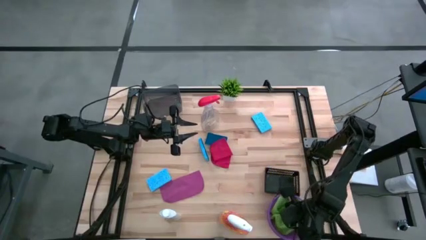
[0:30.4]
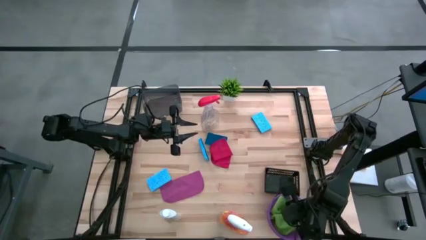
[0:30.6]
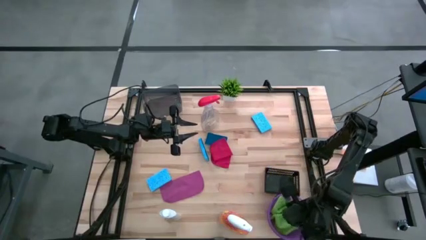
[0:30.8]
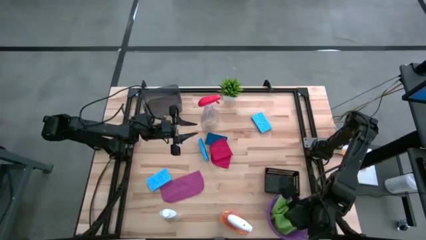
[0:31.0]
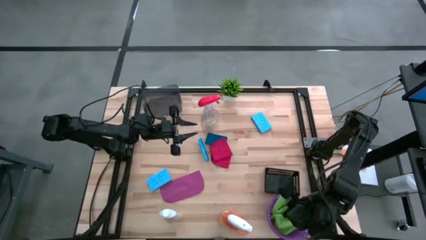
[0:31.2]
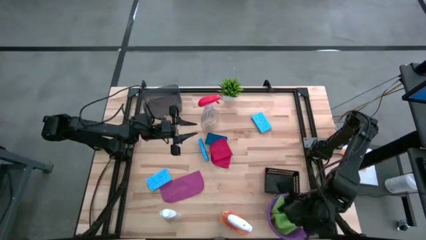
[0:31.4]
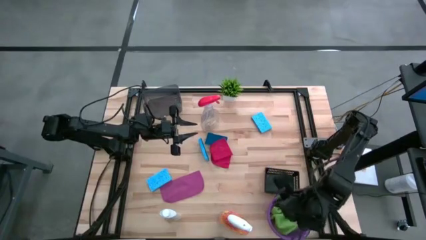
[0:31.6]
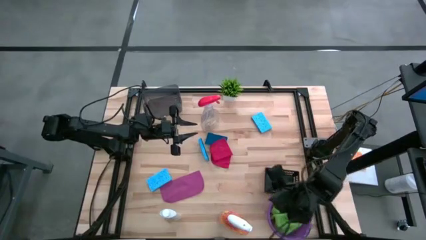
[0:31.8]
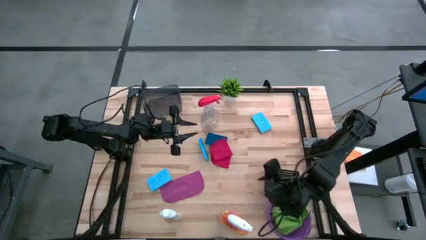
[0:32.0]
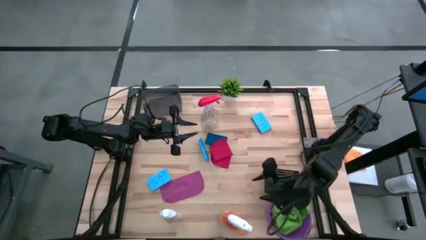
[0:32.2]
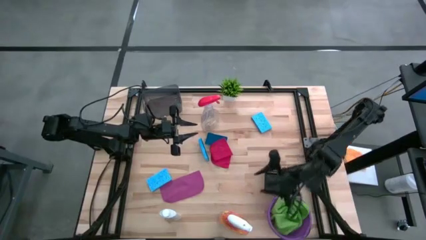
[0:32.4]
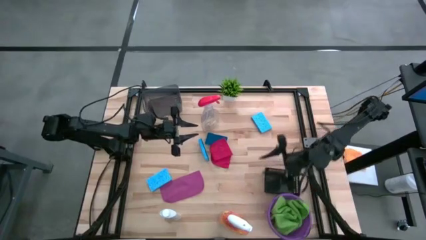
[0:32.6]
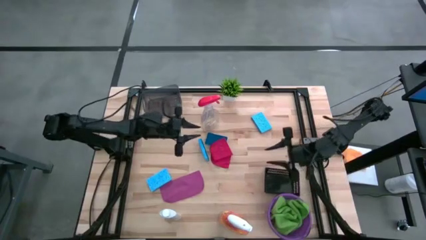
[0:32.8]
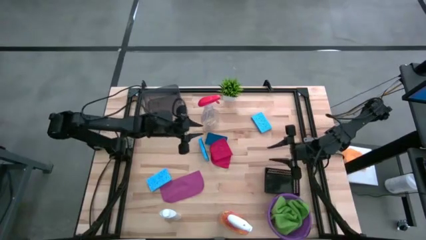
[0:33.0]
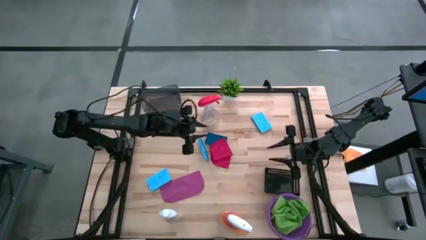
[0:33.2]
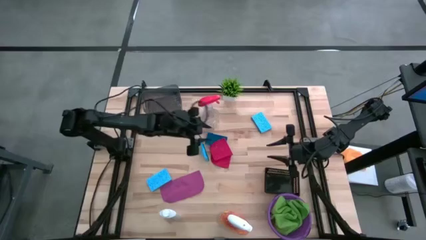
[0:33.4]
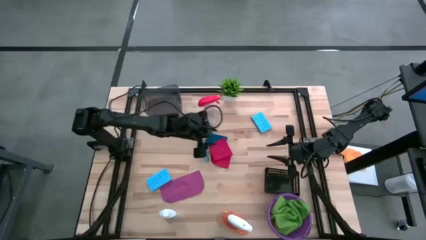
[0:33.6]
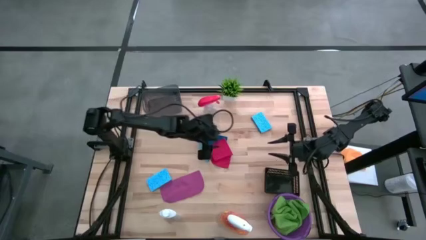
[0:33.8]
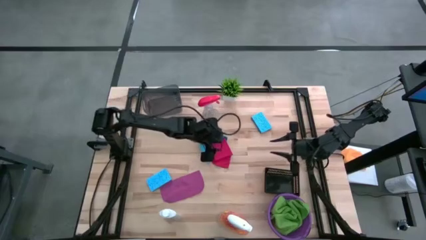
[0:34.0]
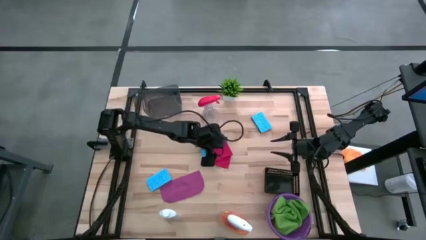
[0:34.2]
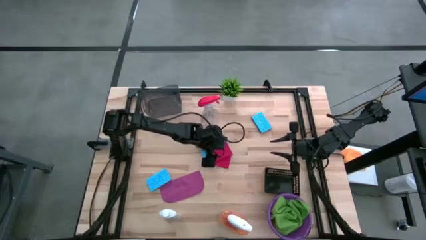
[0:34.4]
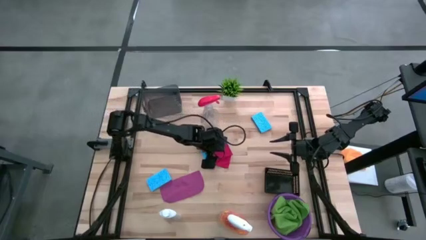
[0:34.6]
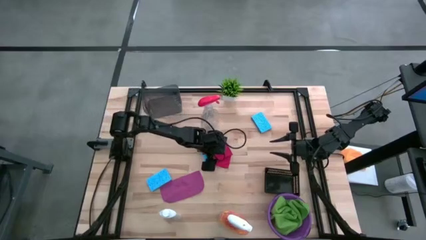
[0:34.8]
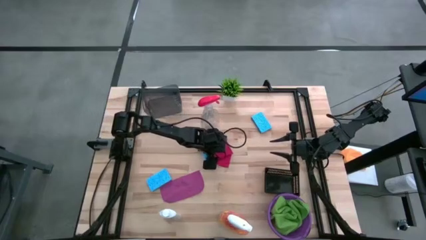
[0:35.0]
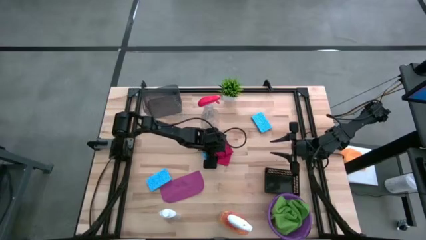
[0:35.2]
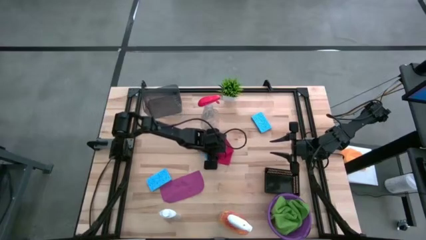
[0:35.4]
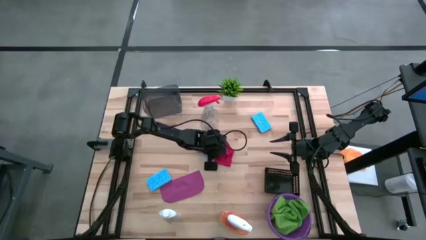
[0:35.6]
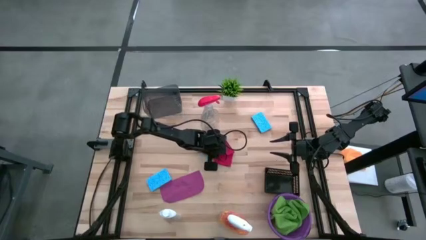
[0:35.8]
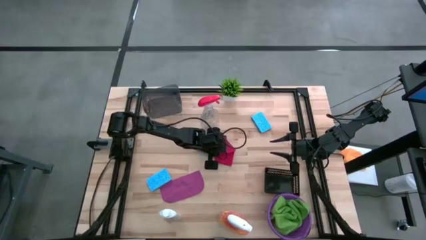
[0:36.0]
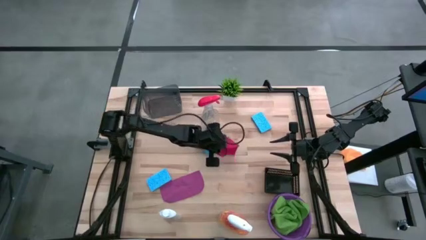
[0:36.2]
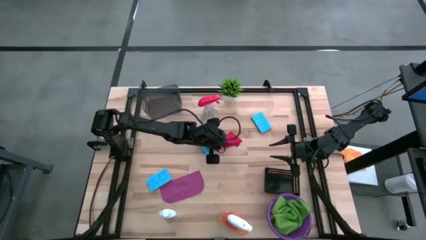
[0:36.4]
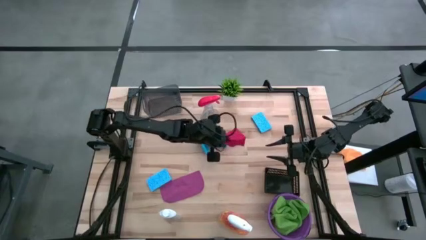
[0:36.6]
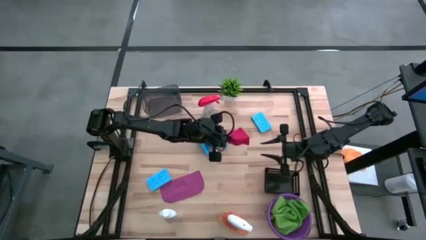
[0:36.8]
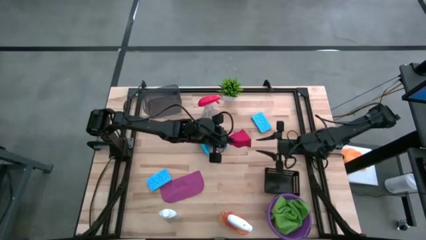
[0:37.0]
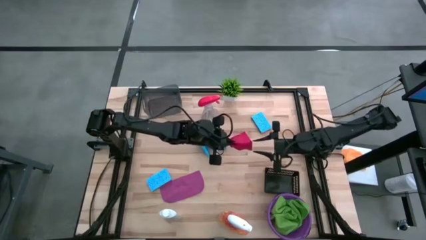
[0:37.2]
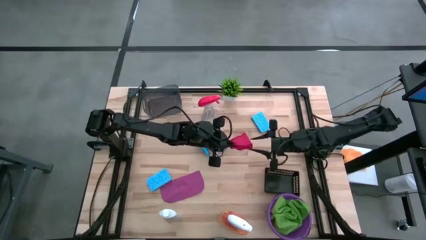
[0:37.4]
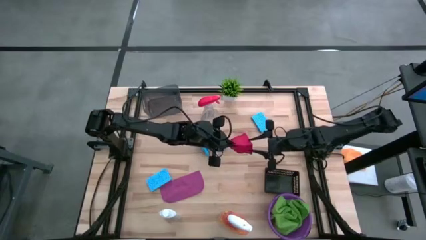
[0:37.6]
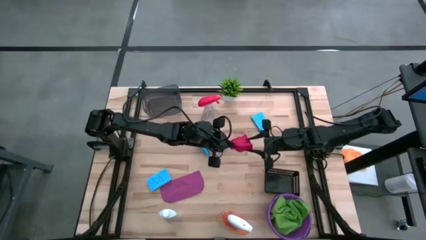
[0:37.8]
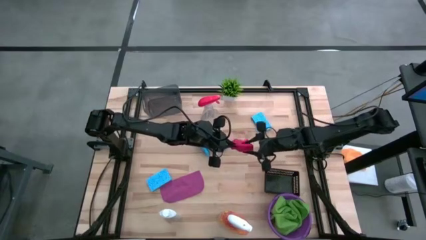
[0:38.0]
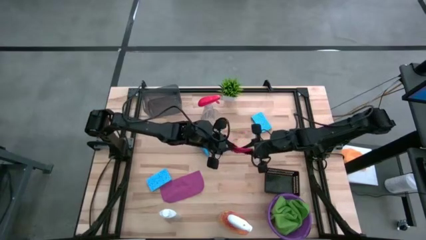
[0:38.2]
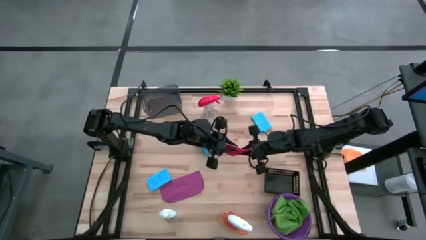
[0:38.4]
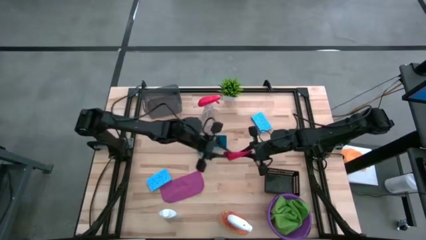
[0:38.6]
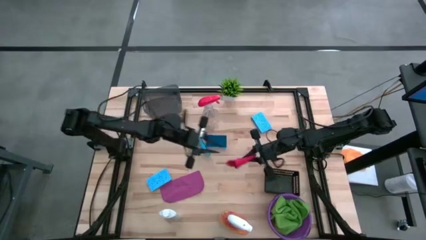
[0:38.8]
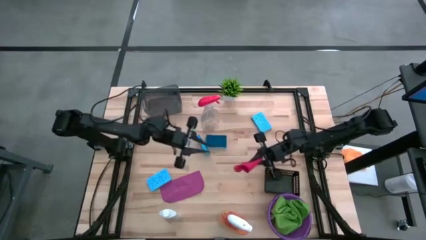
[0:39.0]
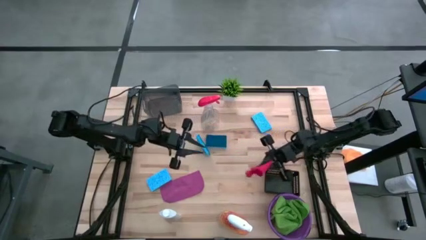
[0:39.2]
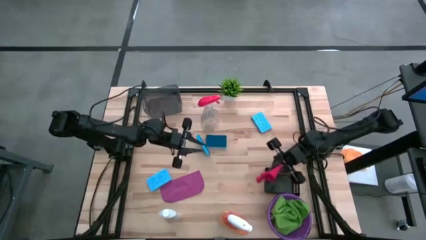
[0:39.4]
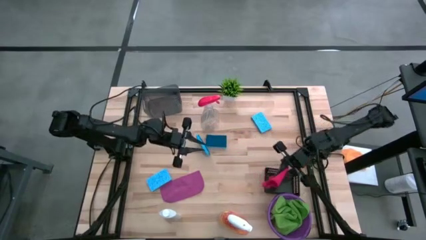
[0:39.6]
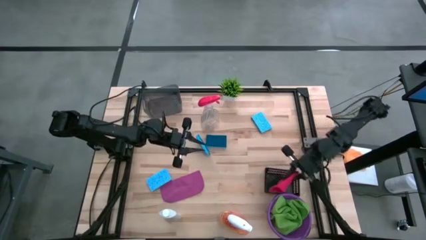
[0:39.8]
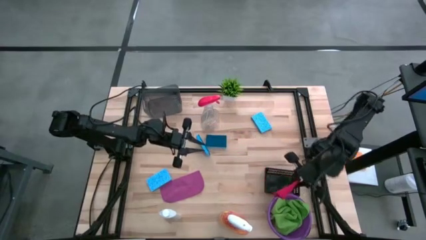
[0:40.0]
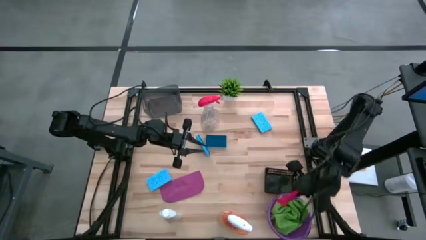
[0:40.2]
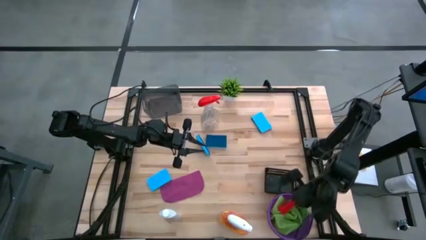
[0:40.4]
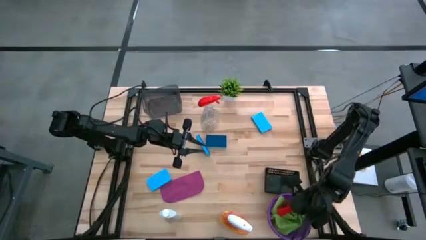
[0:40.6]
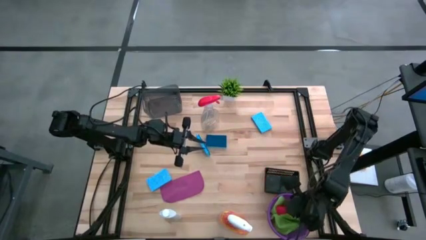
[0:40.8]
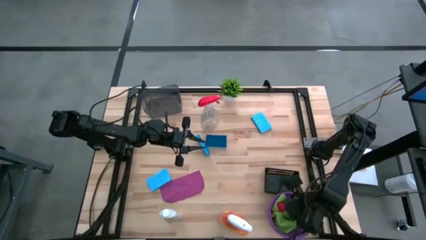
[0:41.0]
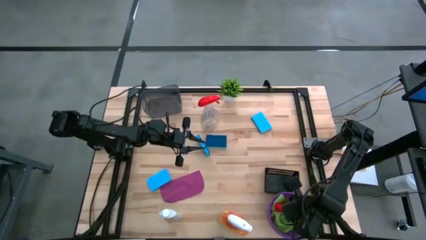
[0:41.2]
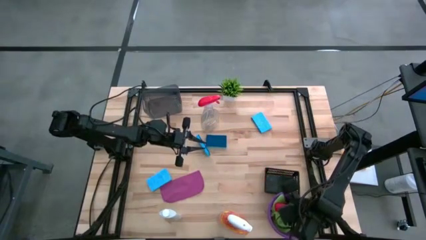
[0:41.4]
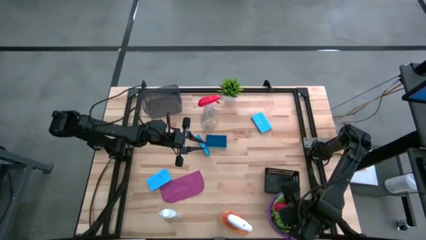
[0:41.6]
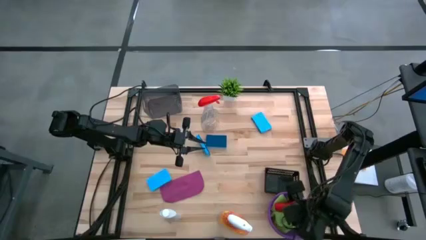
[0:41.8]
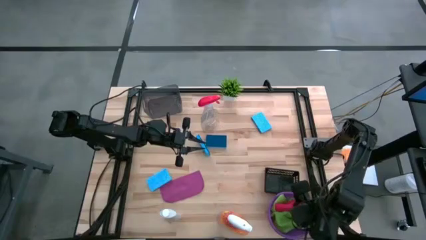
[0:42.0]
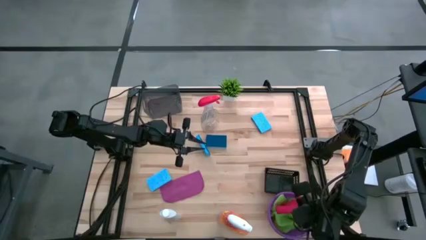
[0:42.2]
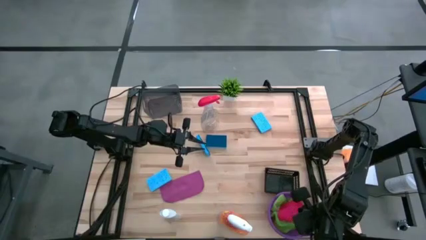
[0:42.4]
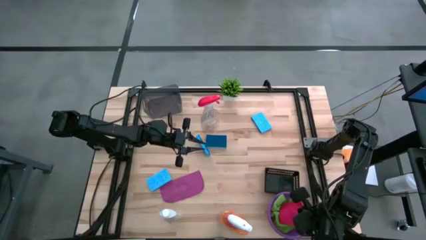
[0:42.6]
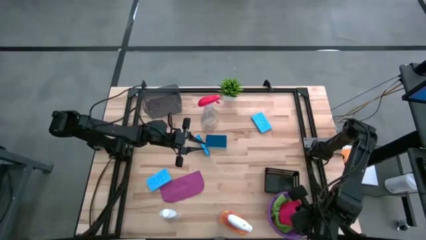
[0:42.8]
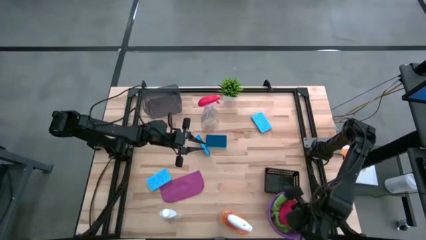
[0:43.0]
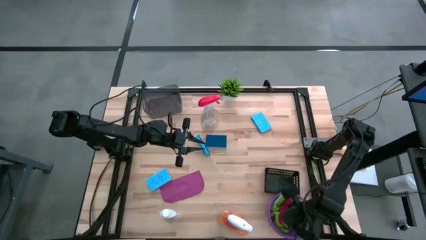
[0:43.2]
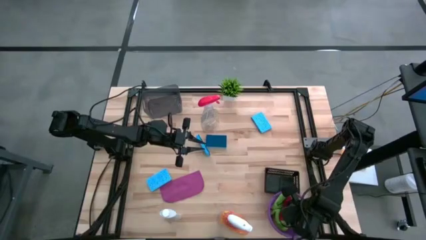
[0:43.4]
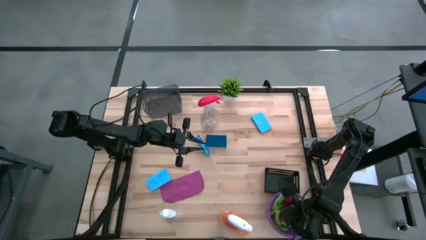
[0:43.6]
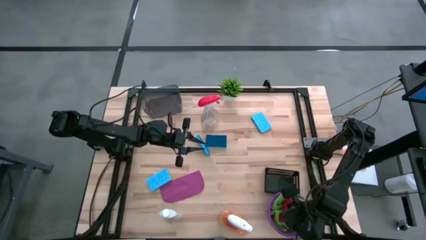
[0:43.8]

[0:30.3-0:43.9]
Task: Pick & Place Kitchen Items
Put the red towel into the purple bucket

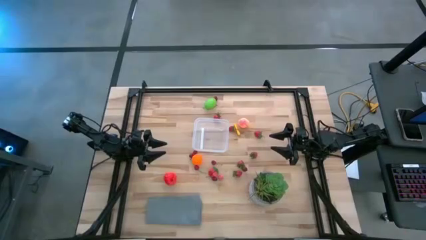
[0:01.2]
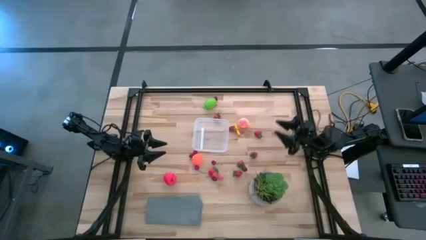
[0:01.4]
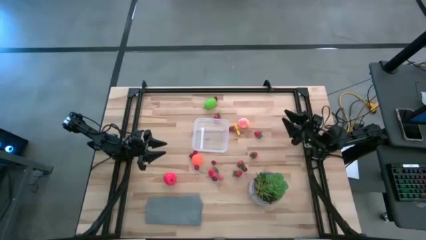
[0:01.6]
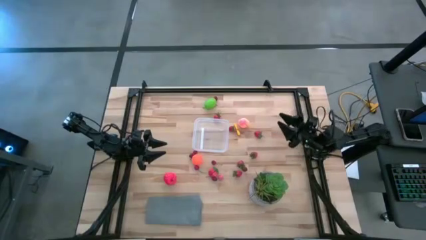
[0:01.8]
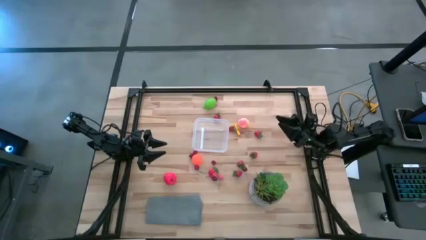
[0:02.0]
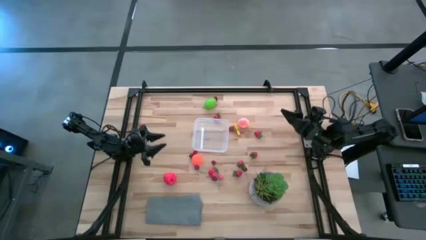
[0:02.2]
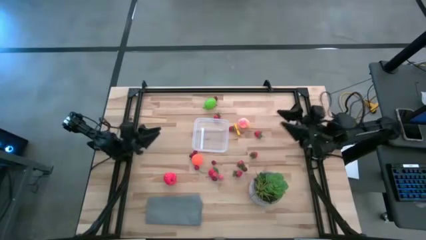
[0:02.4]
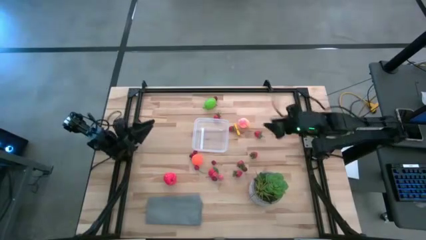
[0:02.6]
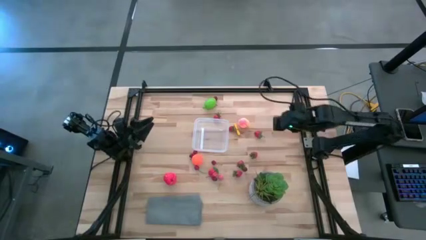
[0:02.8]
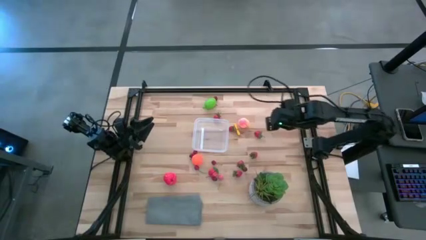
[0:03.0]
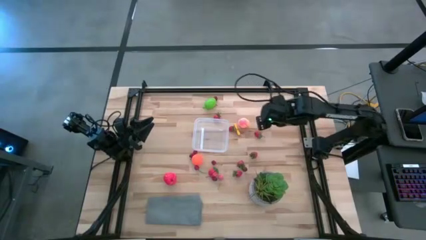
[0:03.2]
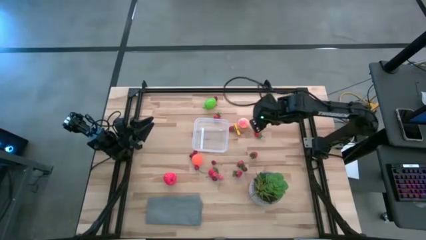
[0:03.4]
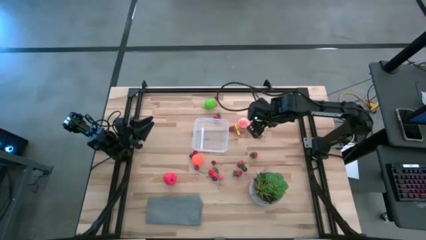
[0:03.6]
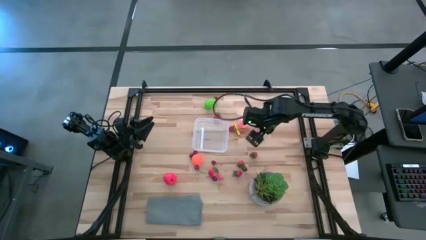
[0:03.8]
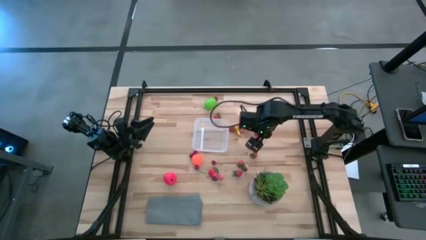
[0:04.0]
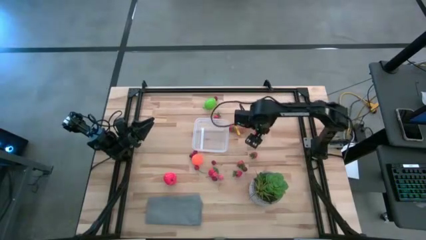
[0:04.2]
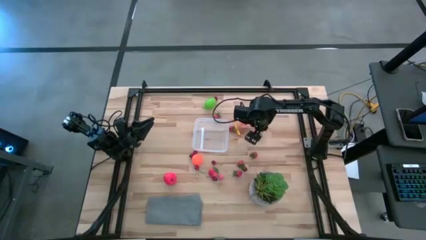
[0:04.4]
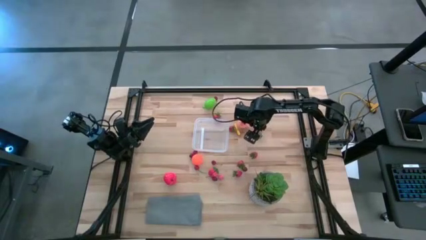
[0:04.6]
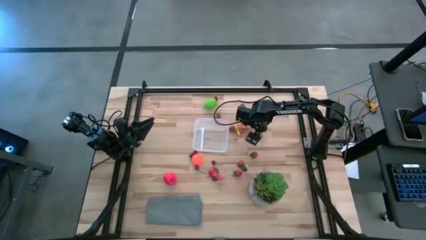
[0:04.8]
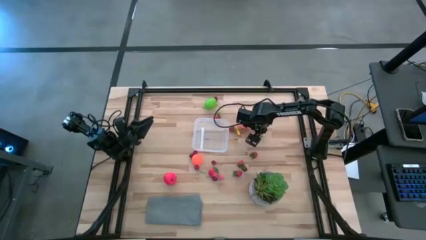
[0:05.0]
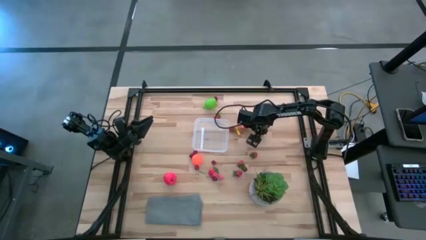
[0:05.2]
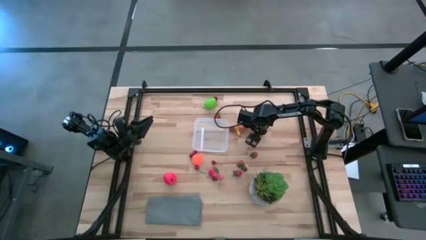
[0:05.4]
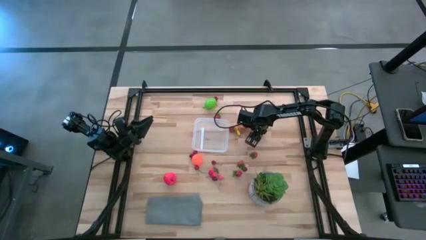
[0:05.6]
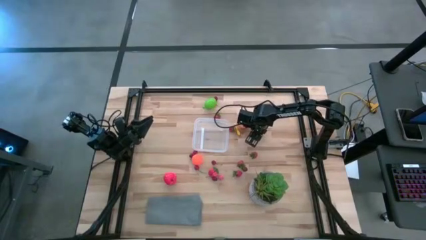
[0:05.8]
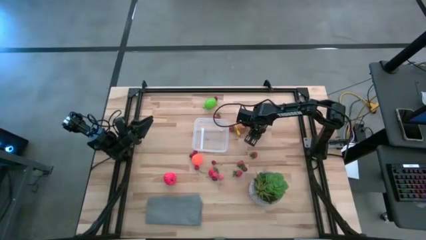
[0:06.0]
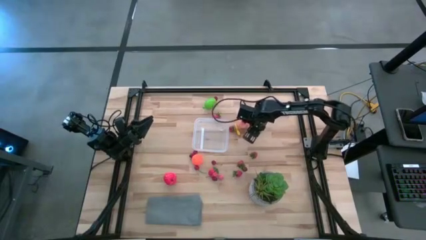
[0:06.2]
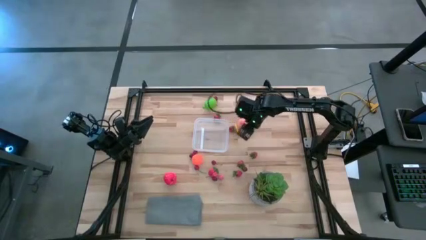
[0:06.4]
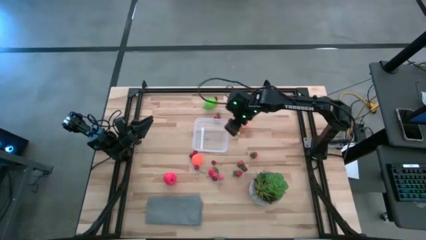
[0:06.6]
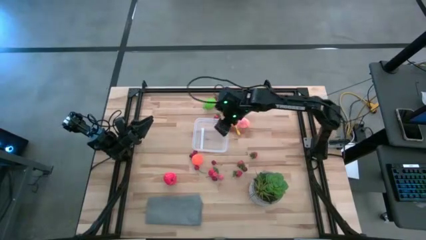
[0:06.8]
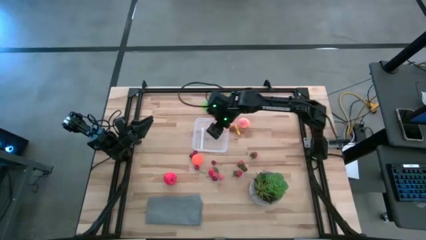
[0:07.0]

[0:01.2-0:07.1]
Task: Pick and placing Produce into tupperware
Put the red strawberry into the transparent bin
